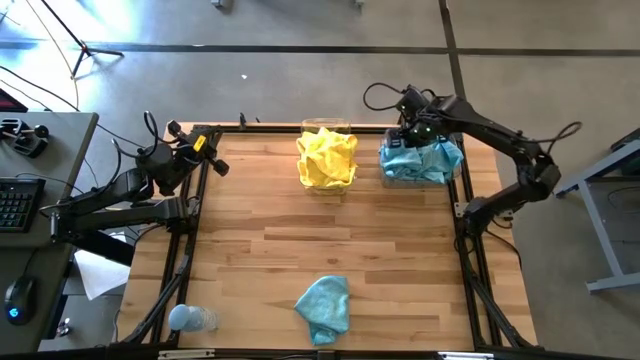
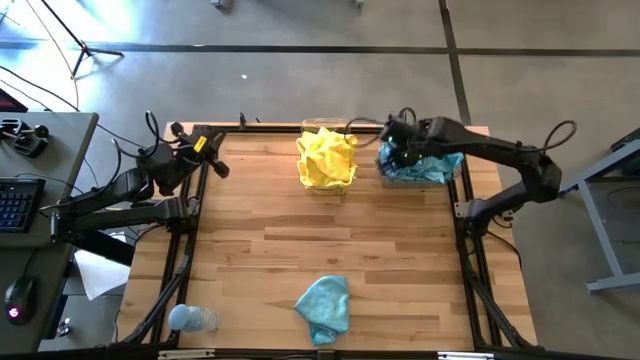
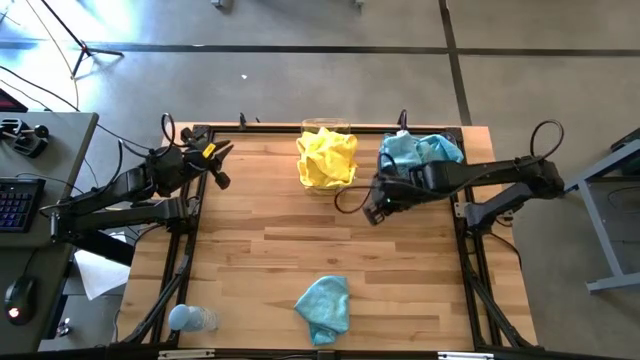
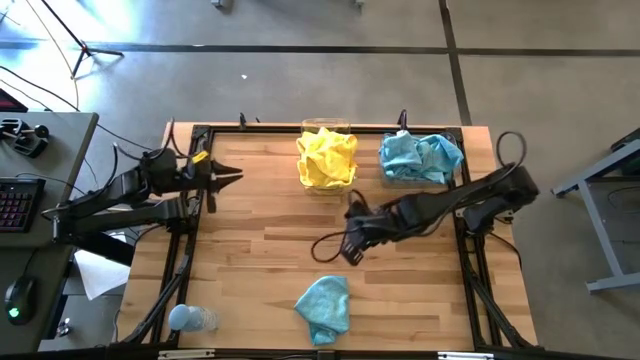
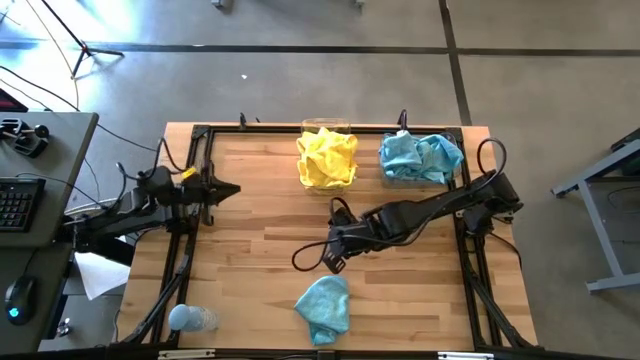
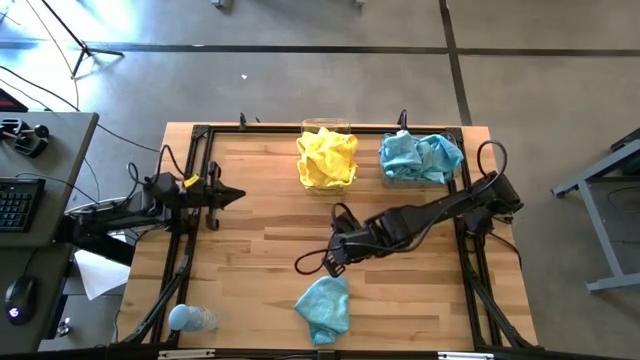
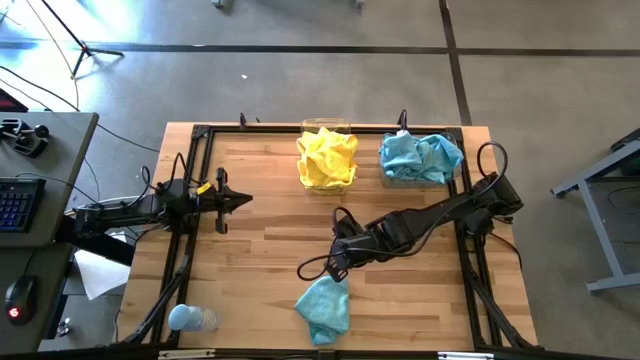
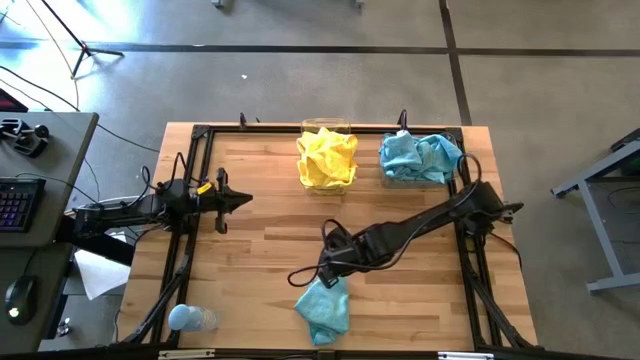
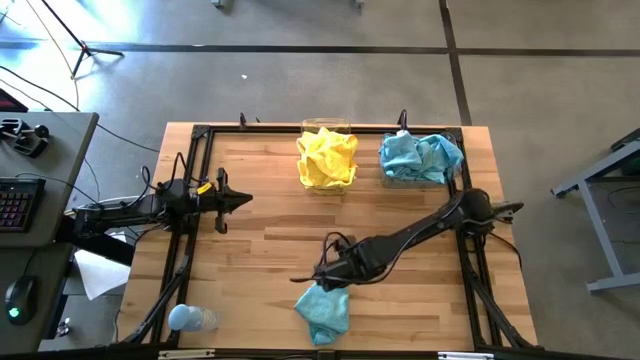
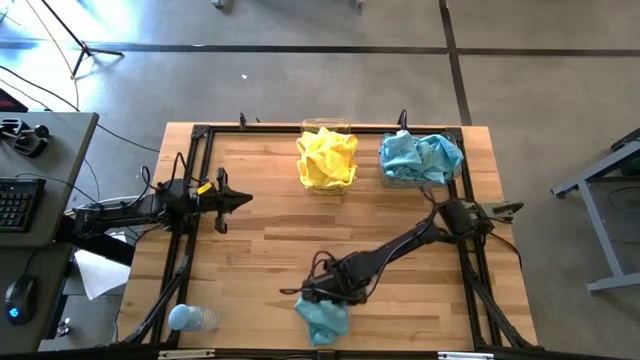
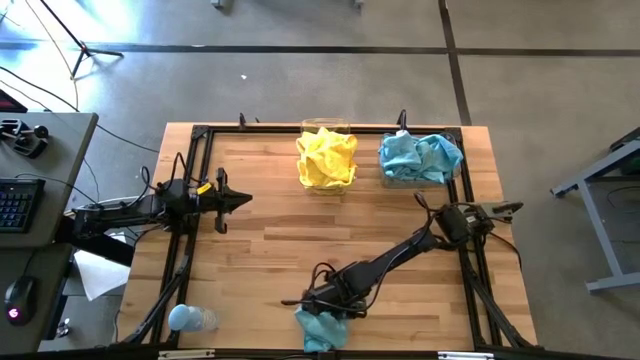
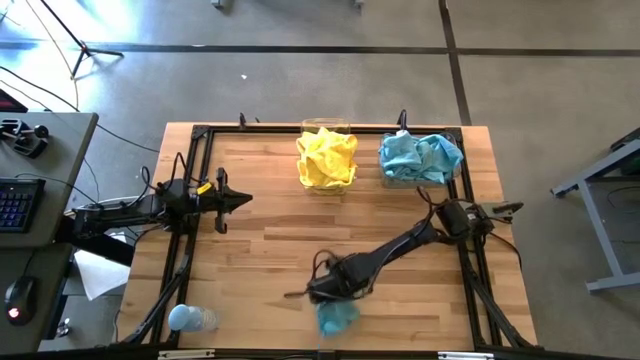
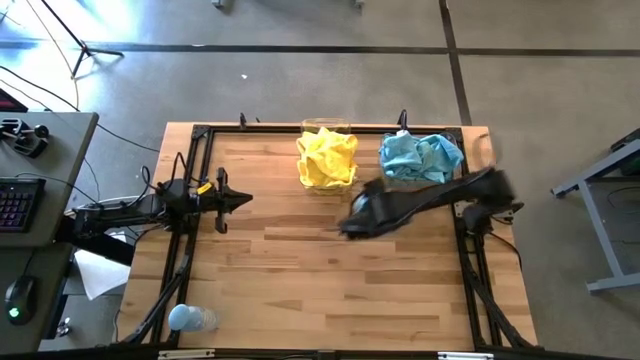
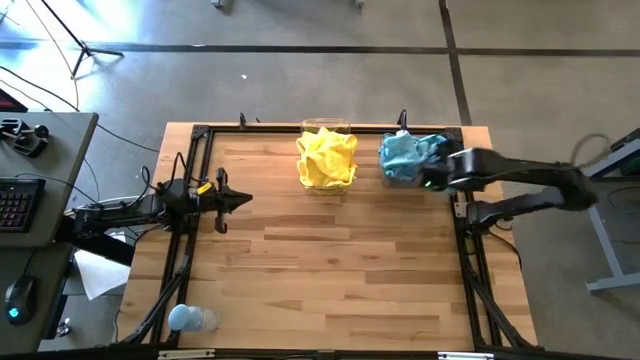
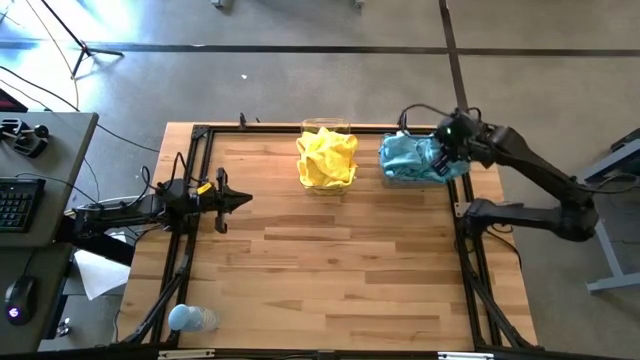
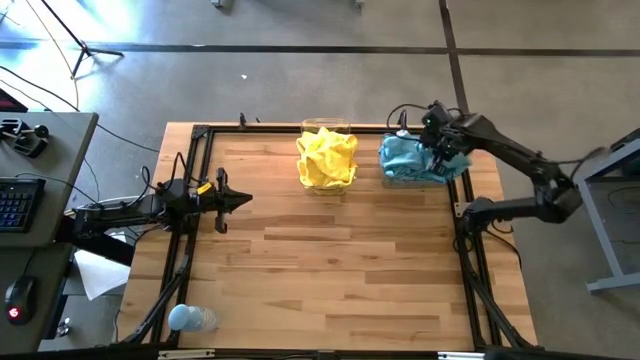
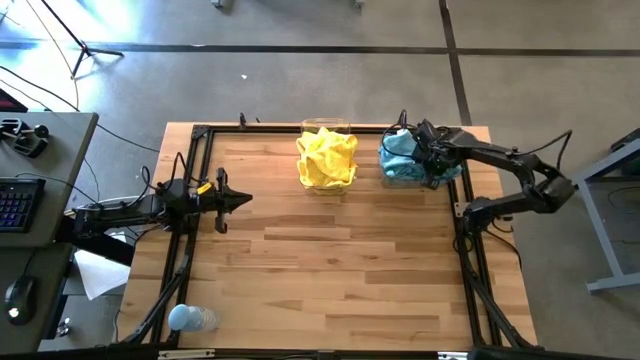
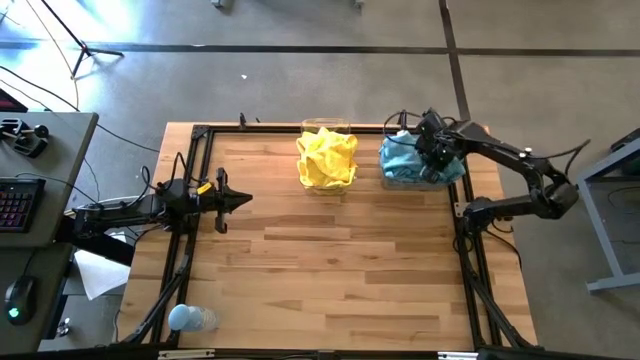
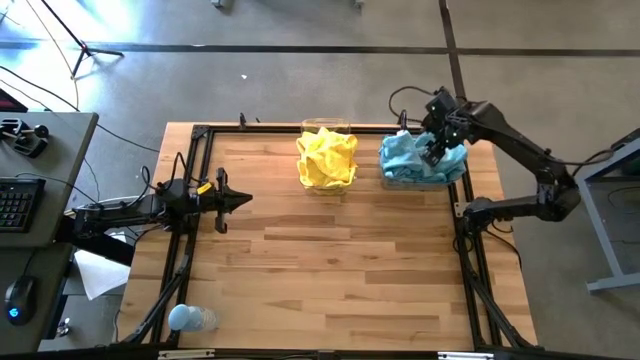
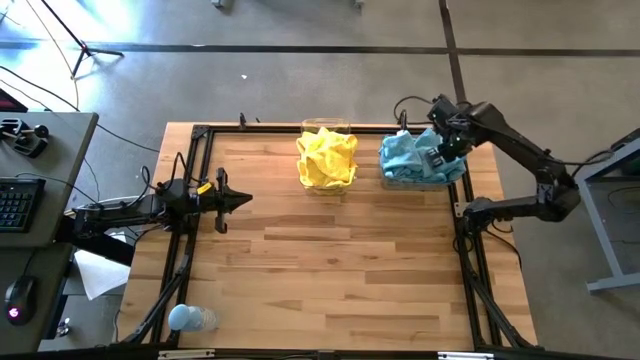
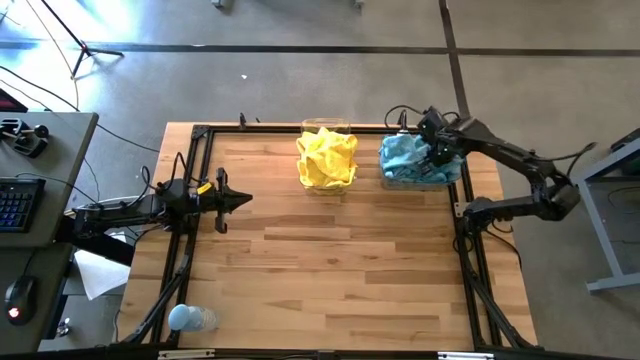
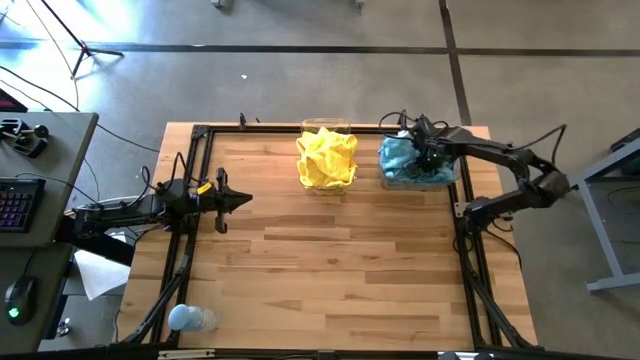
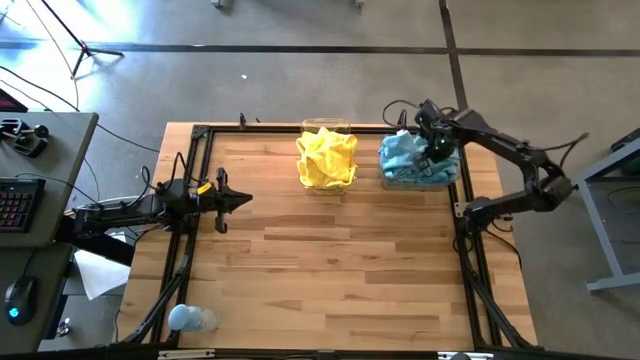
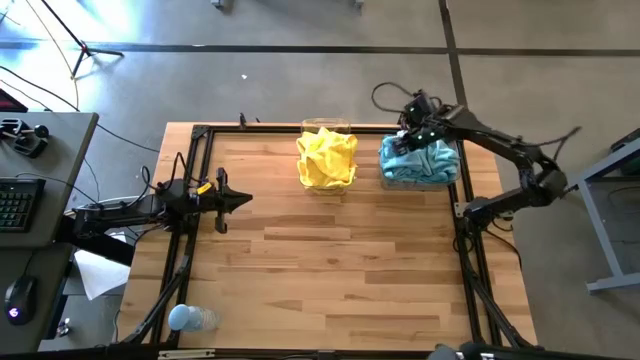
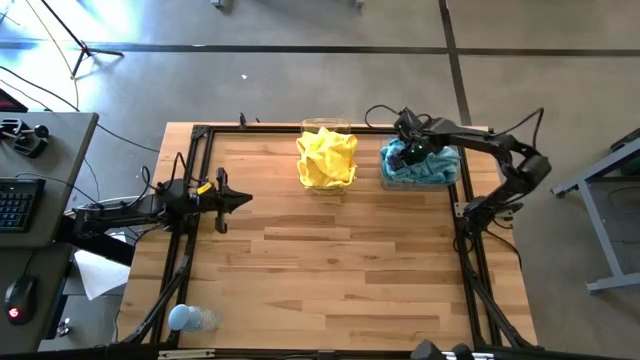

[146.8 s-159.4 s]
Task: Sort microfiber towel by color & place in baskets
Put the blue towel into the right transparent bin

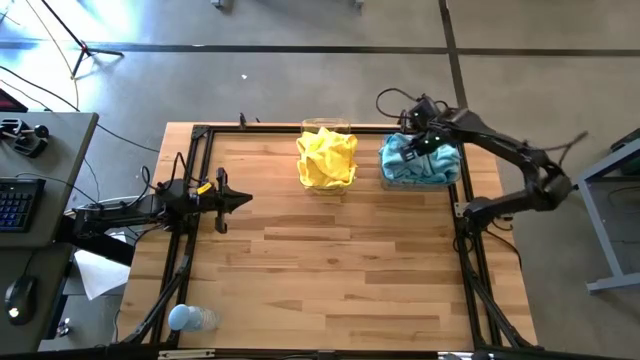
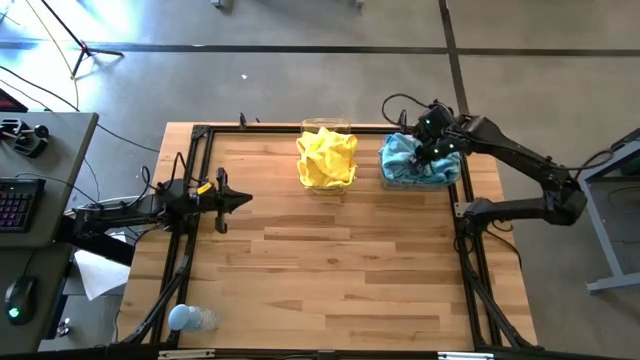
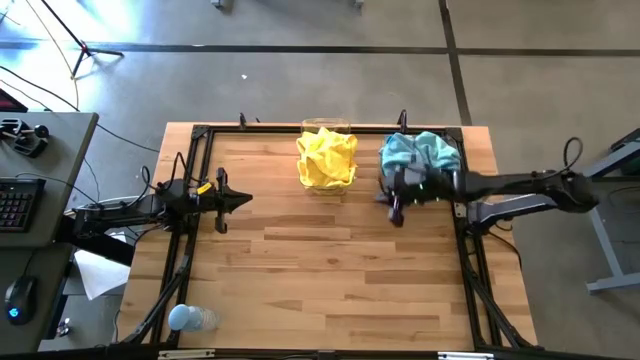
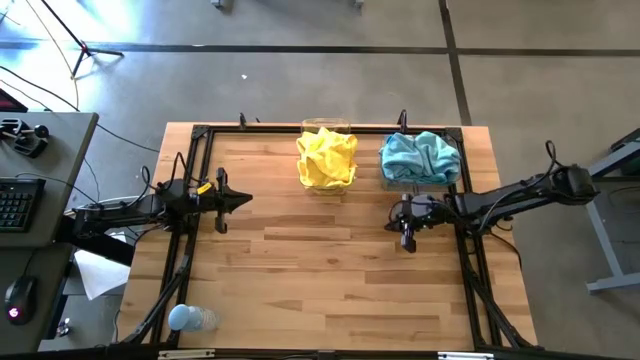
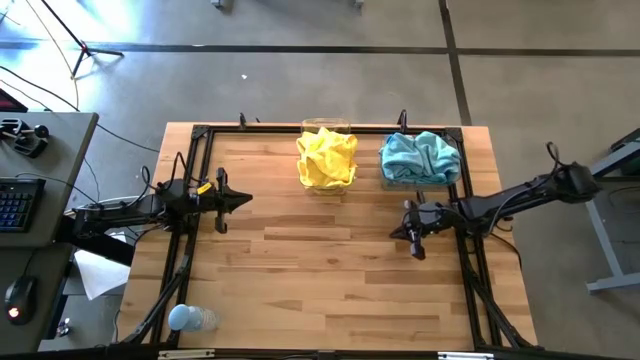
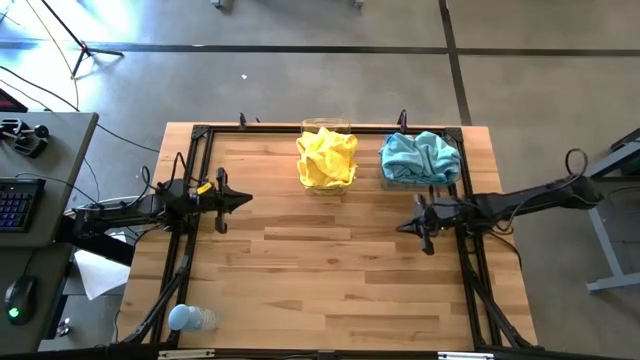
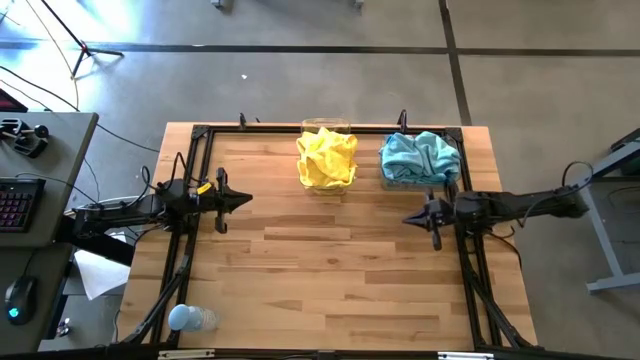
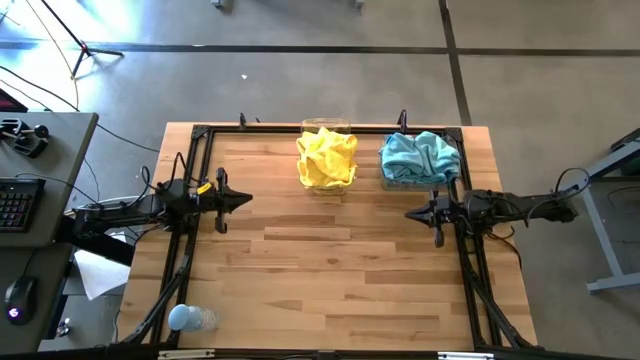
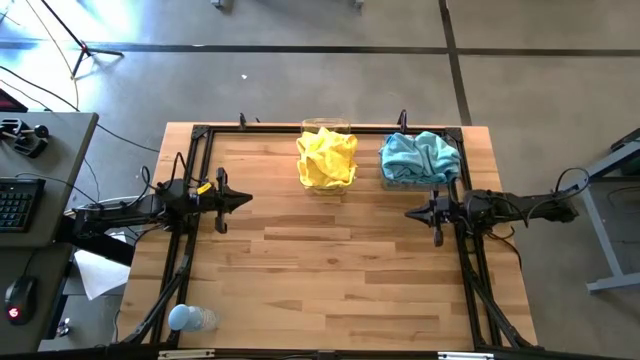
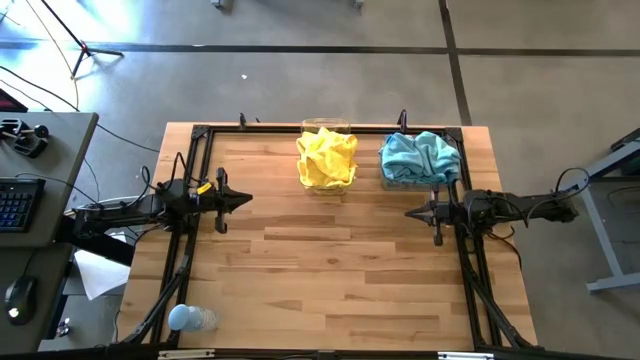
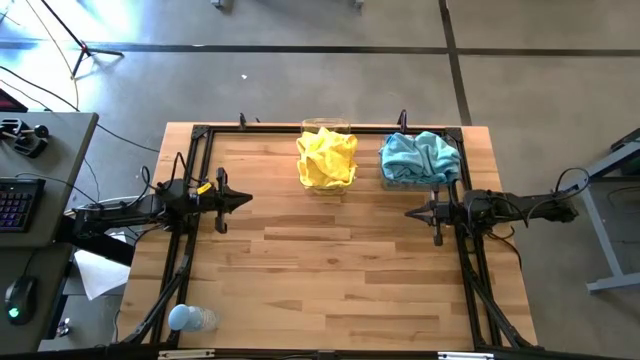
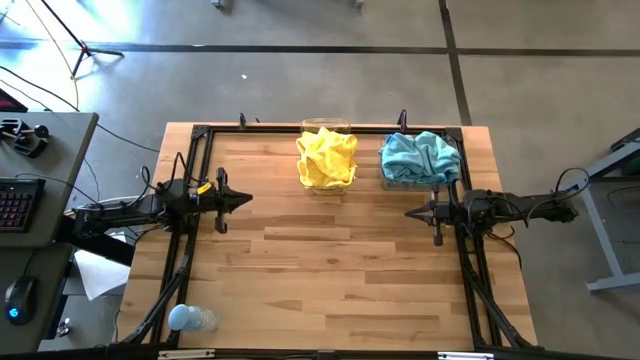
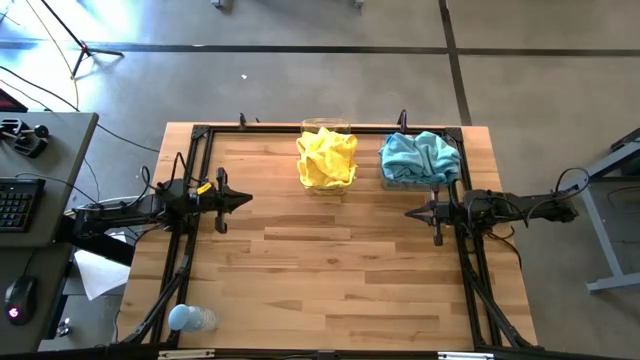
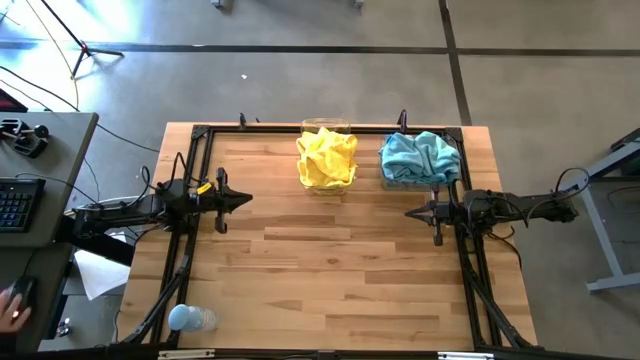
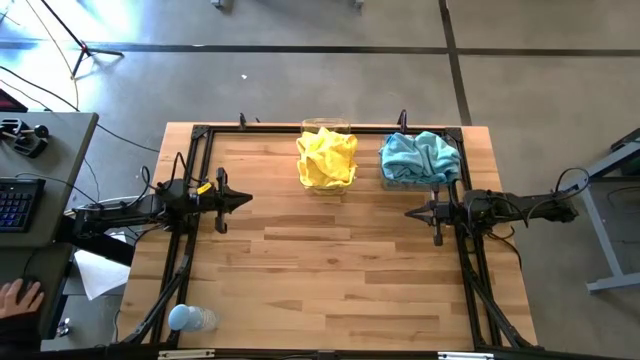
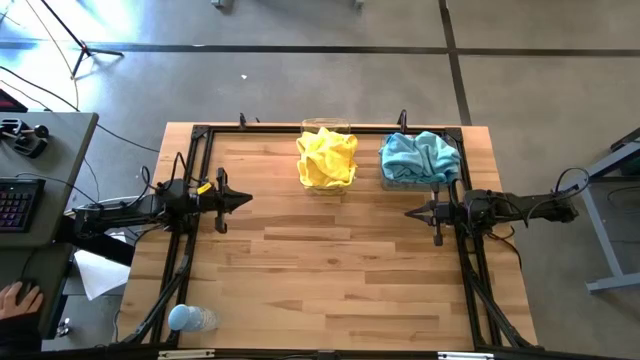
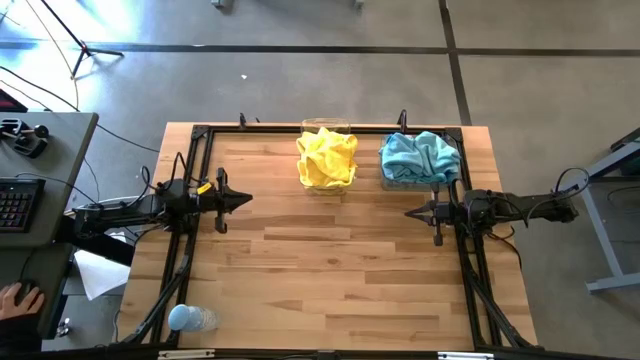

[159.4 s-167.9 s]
Return to Home Position

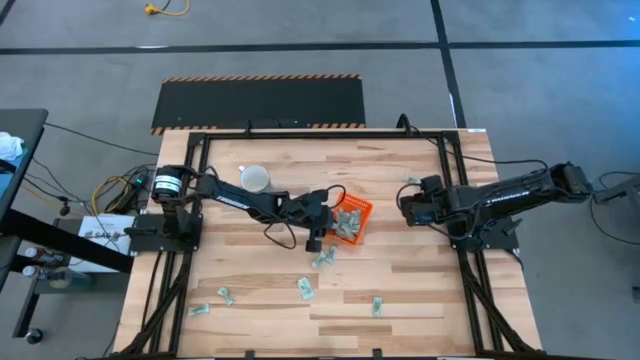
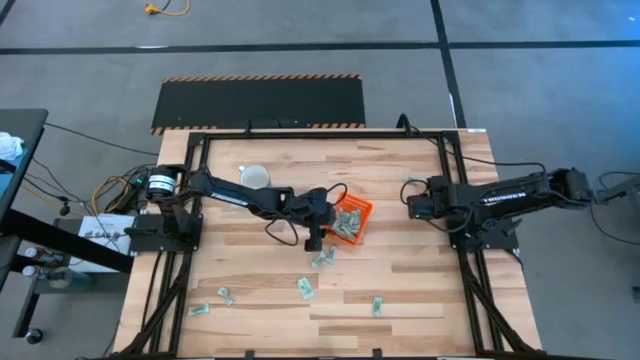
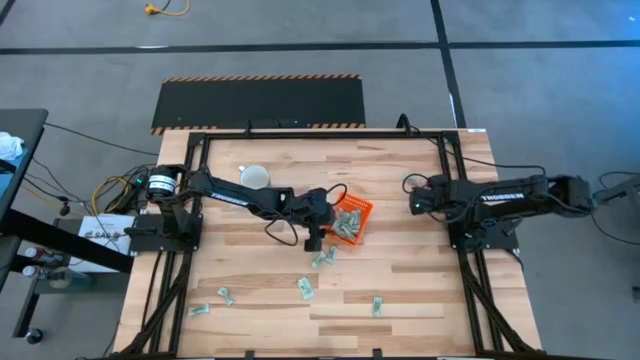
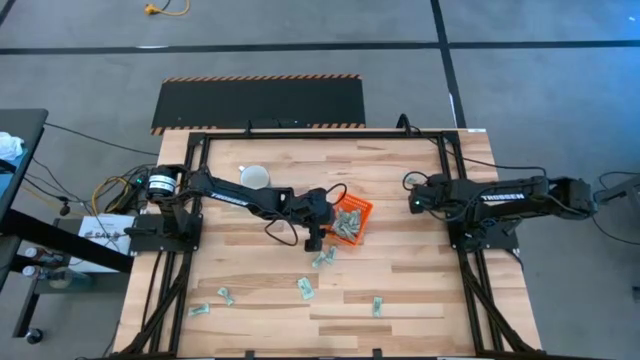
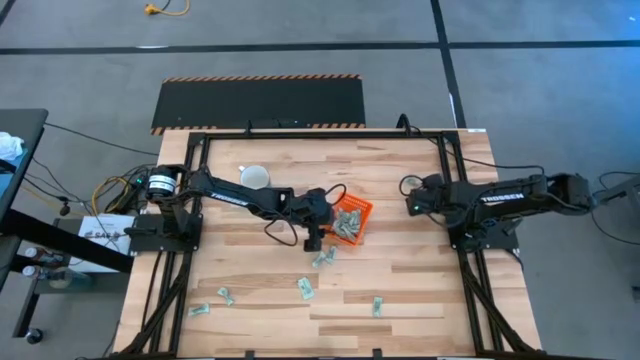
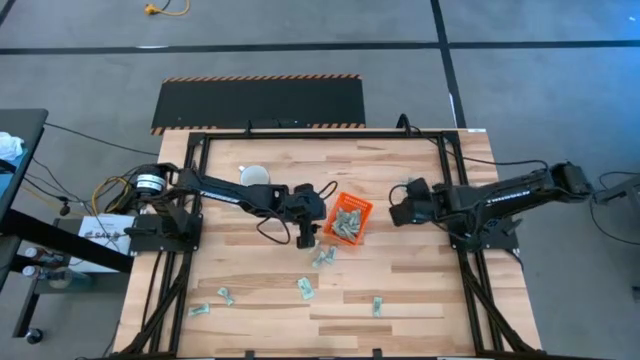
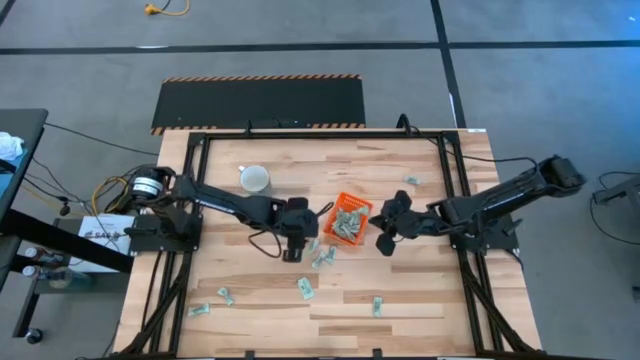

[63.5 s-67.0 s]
Task: Pick and place Stevia / Truvia into bins
Put the stevia packet into the basket
